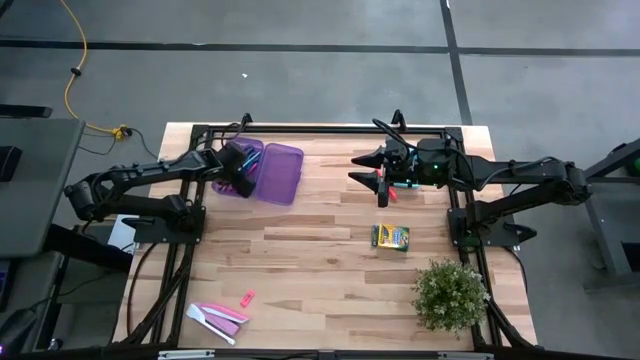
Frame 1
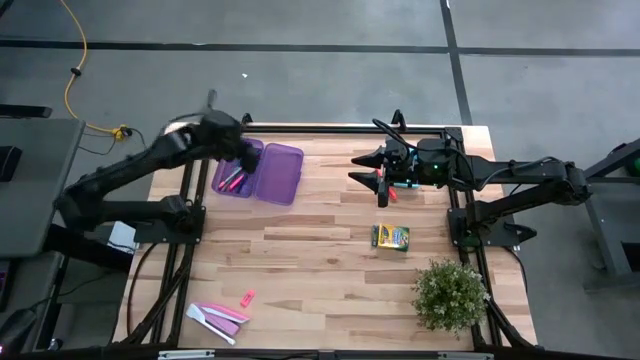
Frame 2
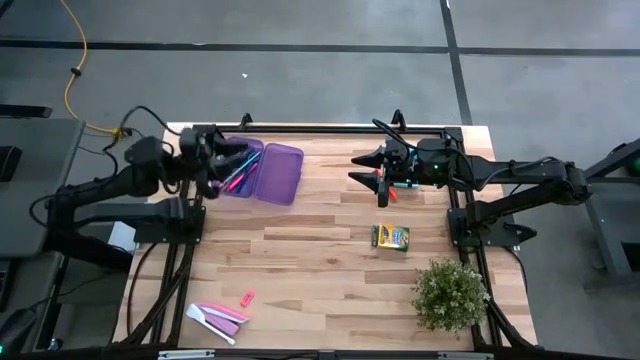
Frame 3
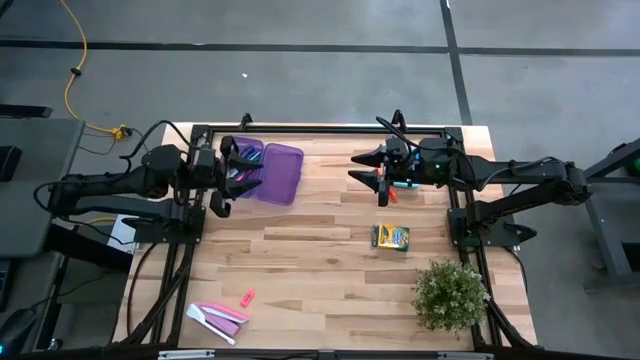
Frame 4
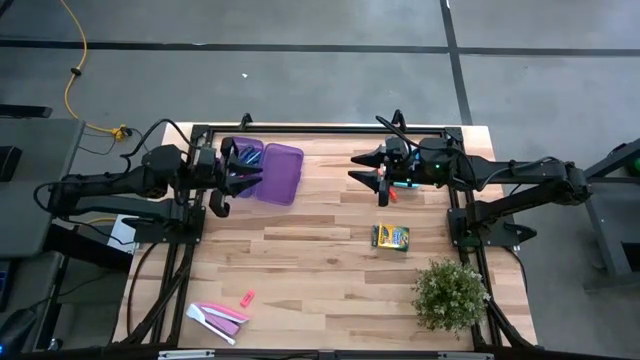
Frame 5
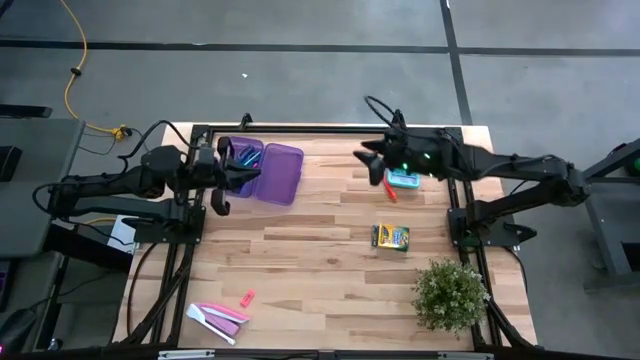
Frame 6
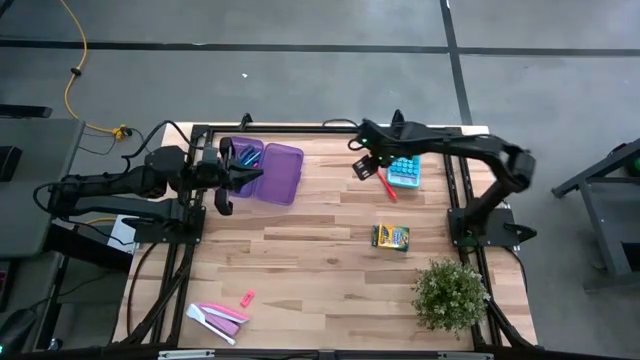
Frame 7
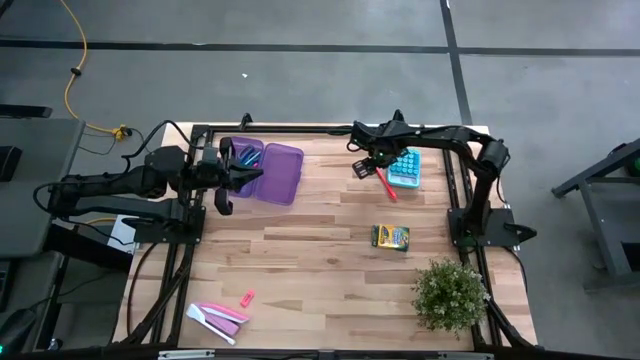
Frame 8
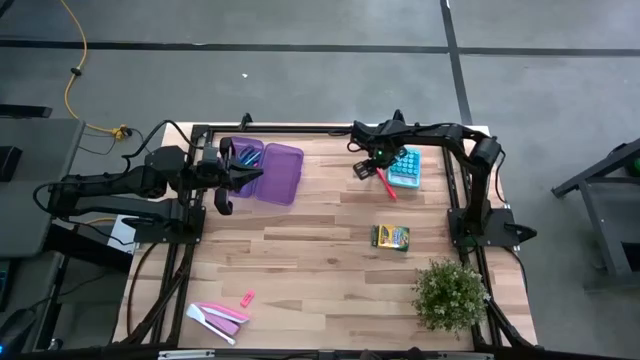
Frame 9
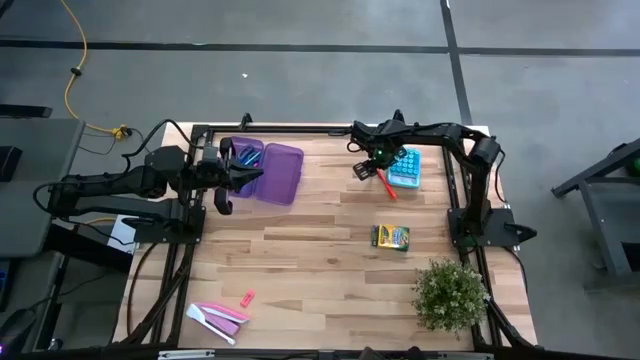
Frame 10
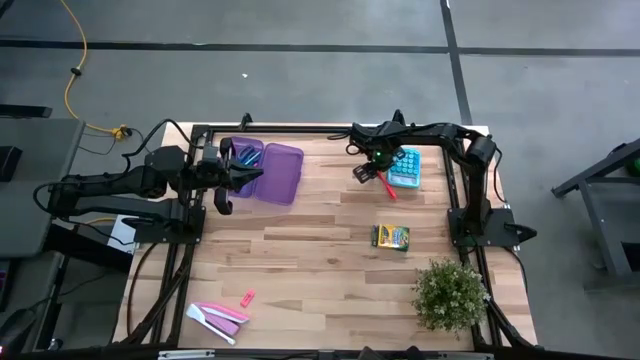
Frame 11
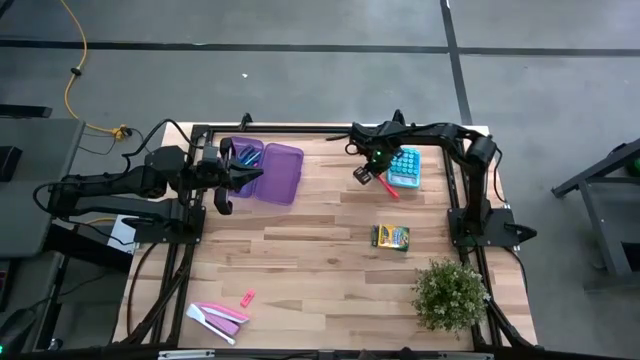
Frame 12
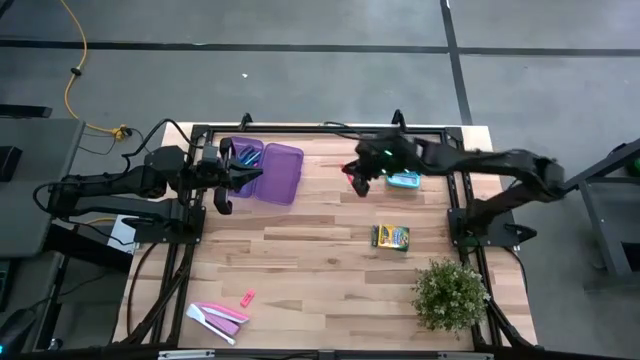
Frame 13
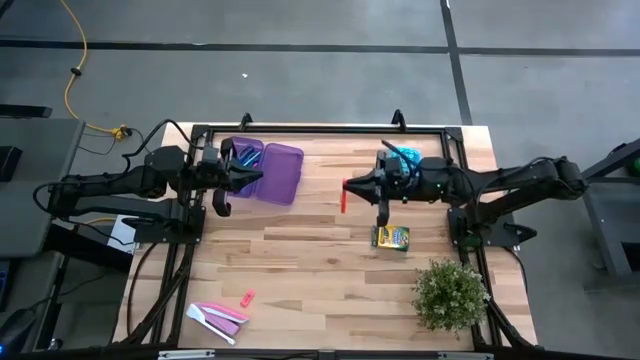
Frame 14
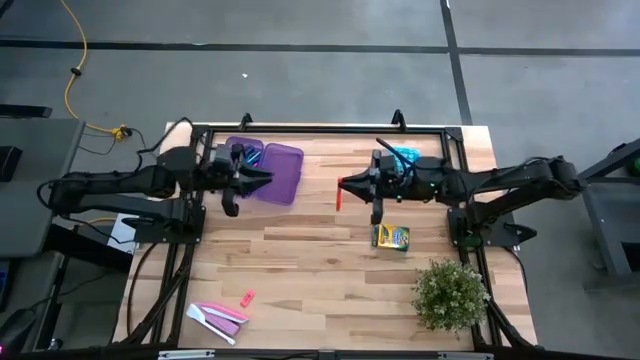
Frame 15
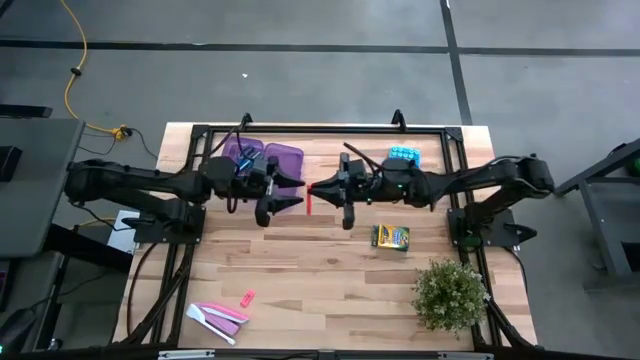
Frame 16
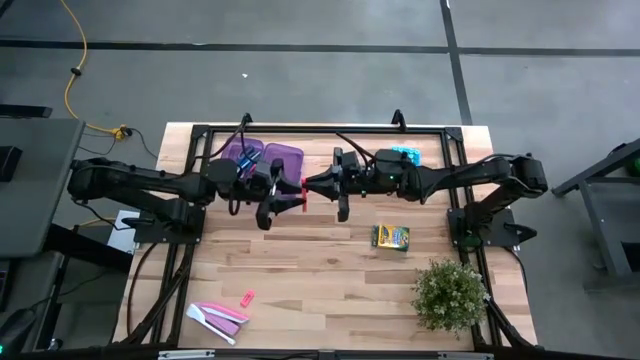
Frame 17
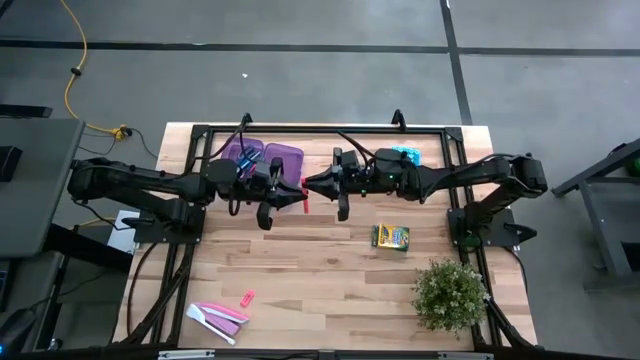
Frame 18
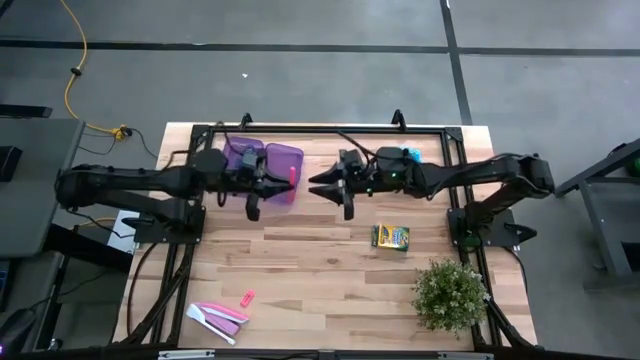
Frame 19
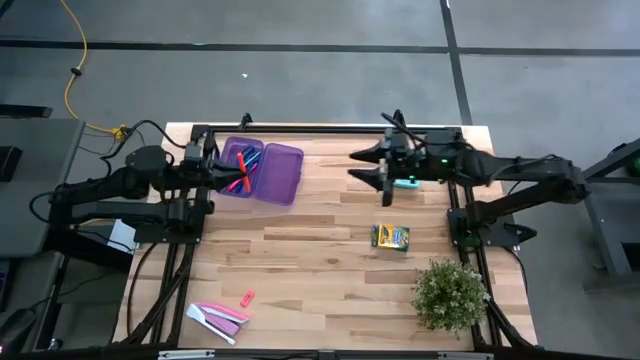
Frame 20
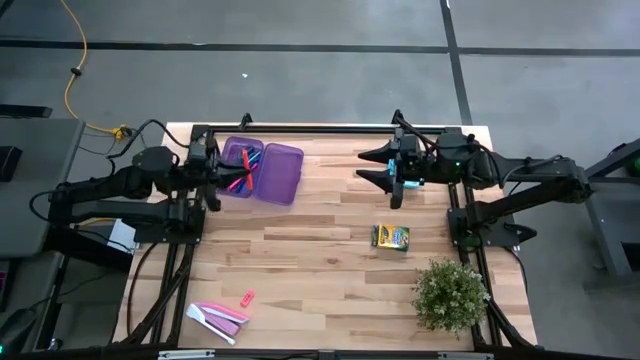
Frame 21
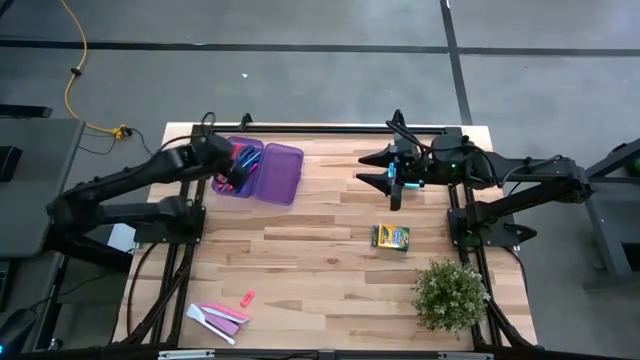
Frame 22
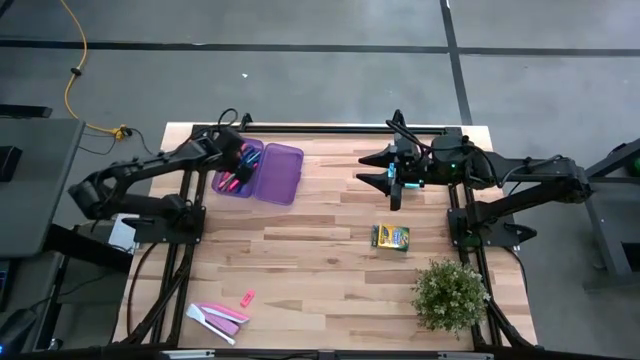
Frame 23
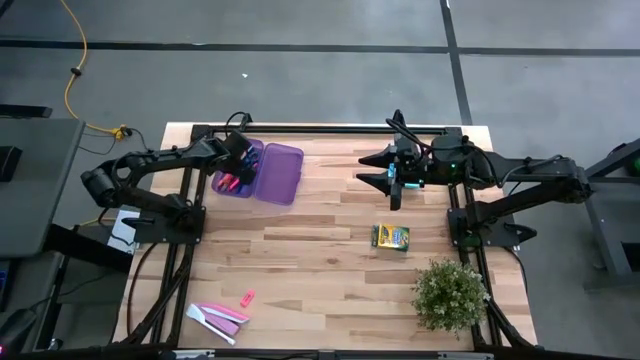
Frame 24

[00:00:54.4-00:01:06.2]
Task: Pack school essentials
Put the orange pen into the purple supply box

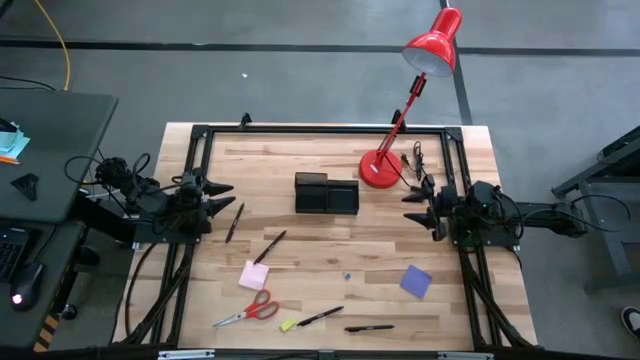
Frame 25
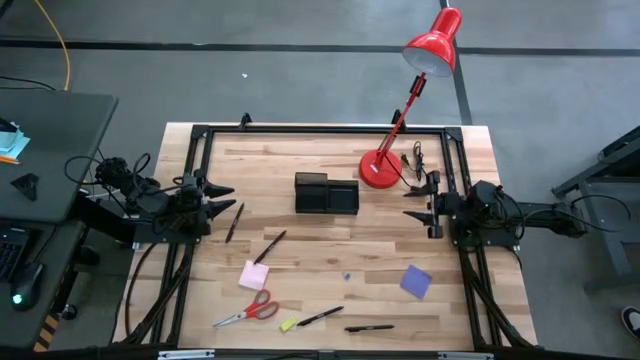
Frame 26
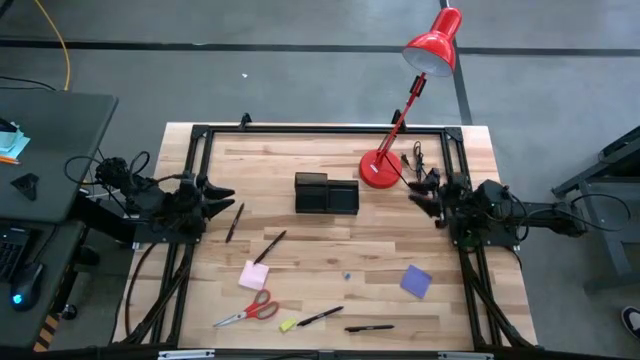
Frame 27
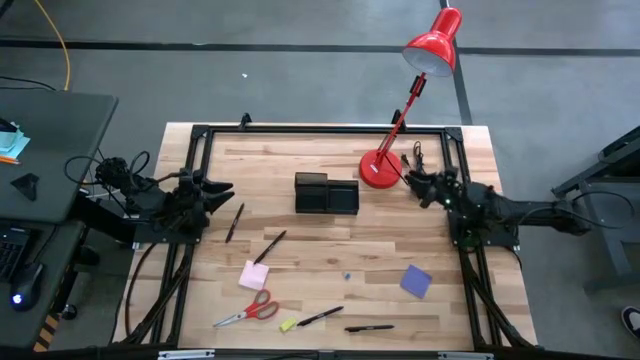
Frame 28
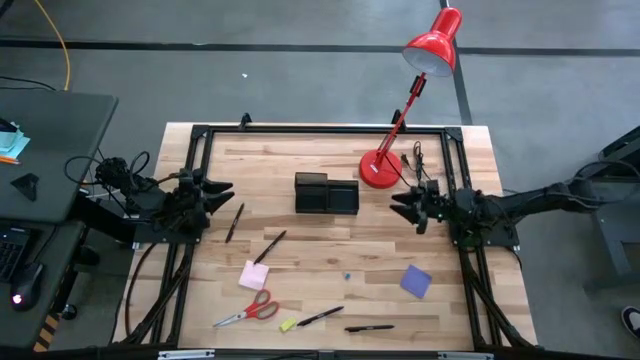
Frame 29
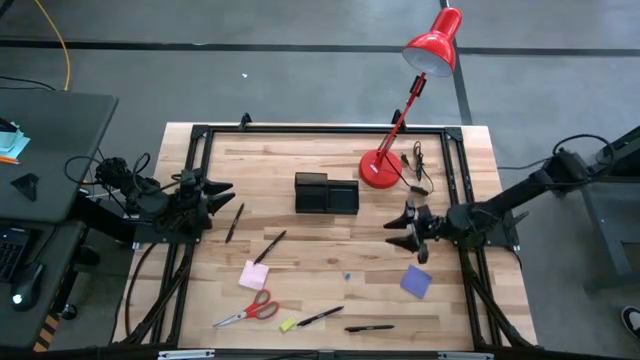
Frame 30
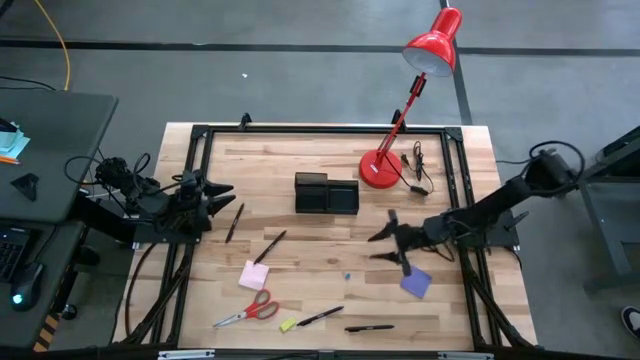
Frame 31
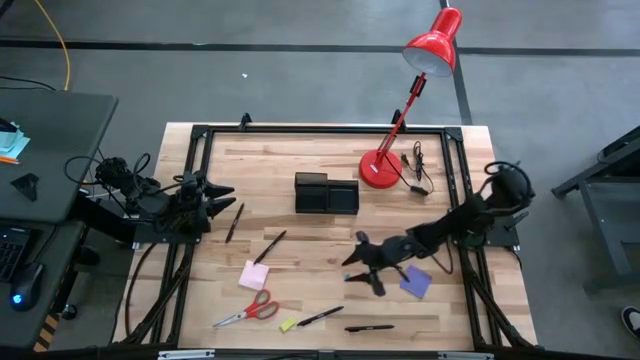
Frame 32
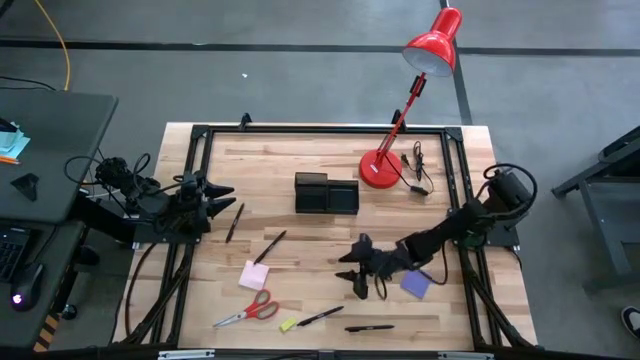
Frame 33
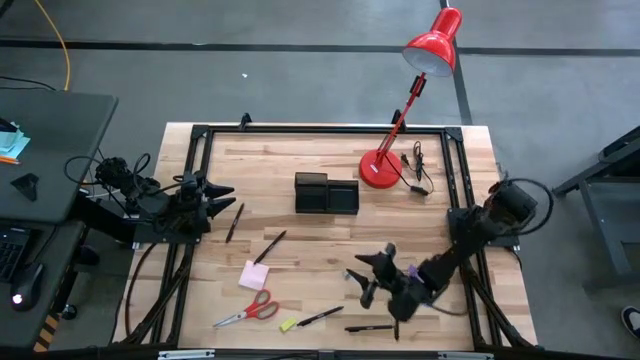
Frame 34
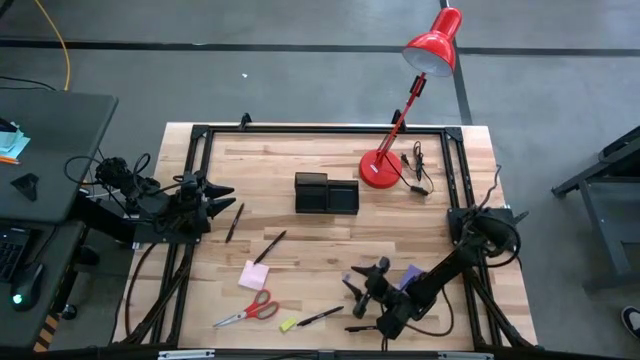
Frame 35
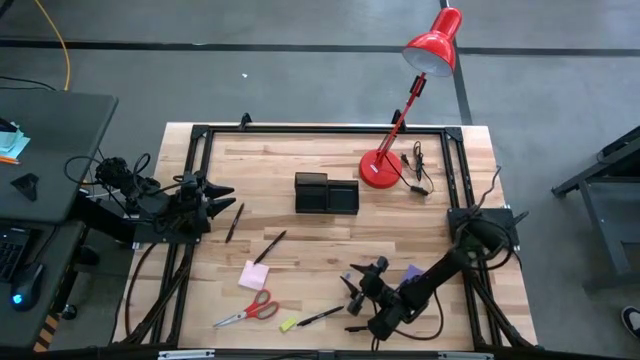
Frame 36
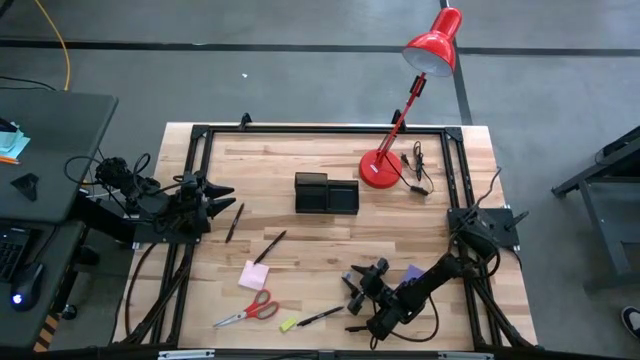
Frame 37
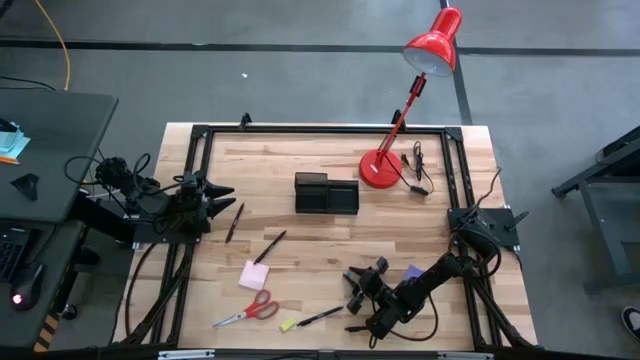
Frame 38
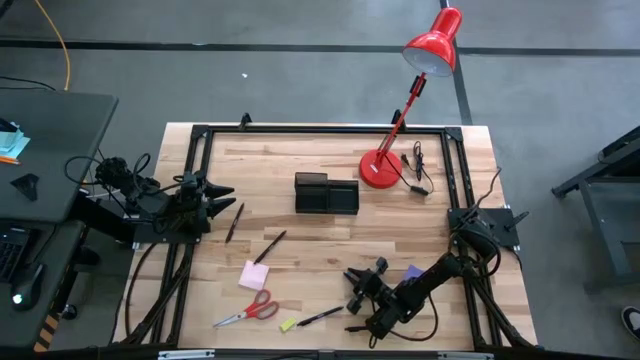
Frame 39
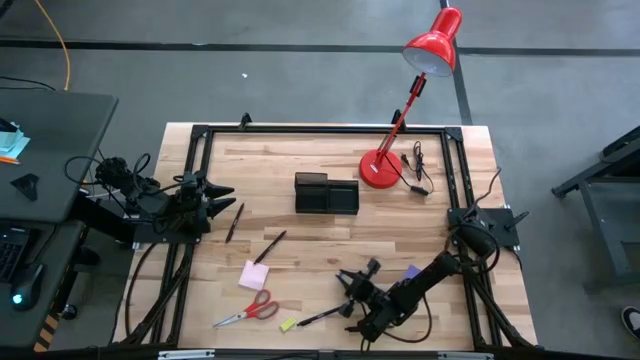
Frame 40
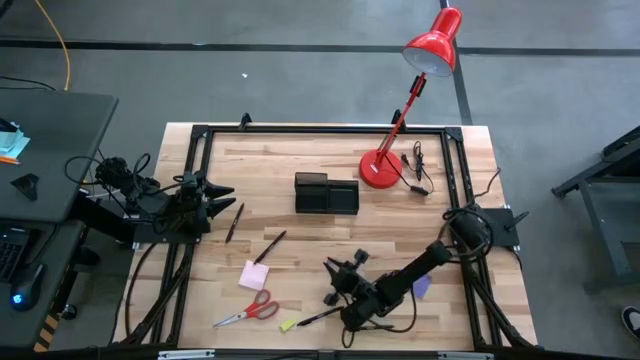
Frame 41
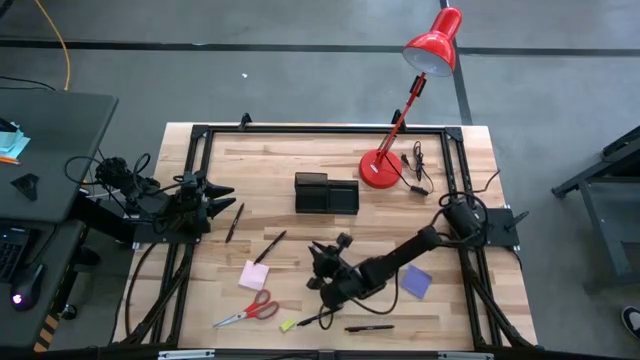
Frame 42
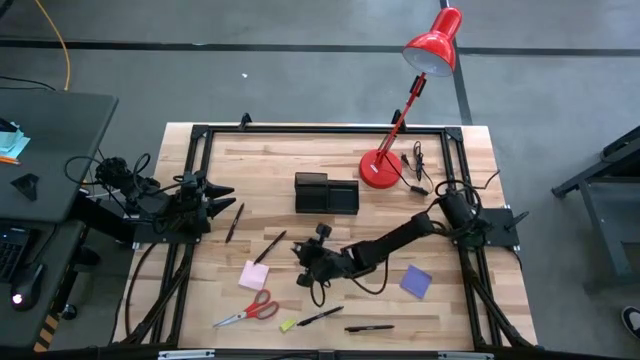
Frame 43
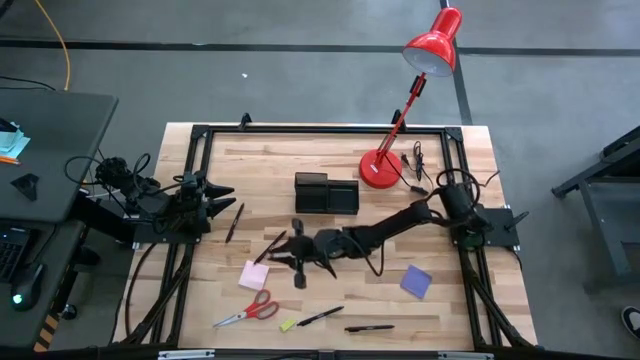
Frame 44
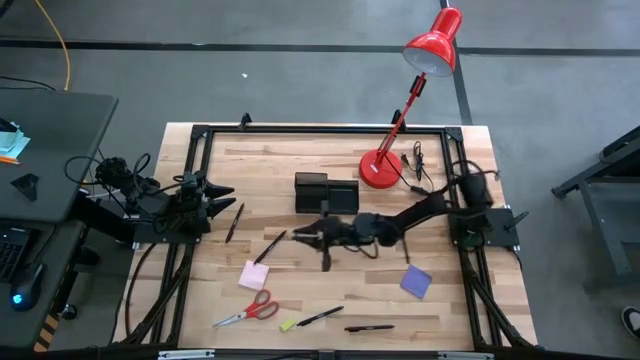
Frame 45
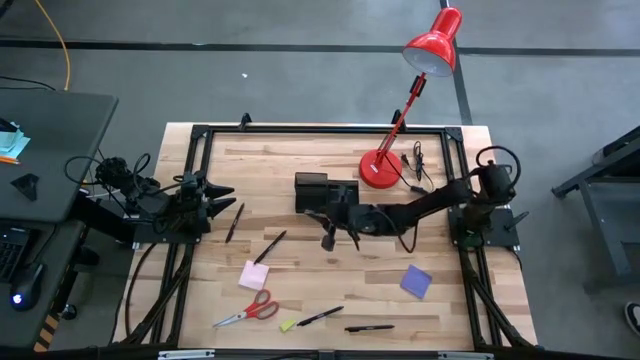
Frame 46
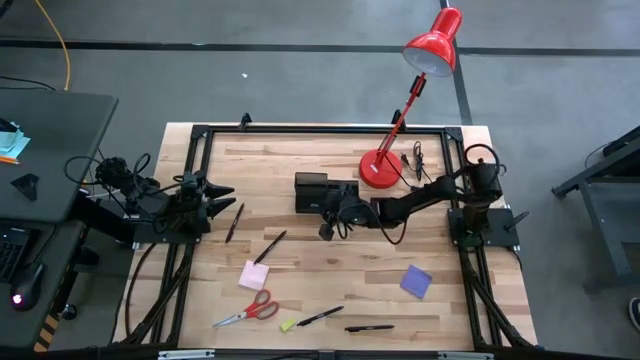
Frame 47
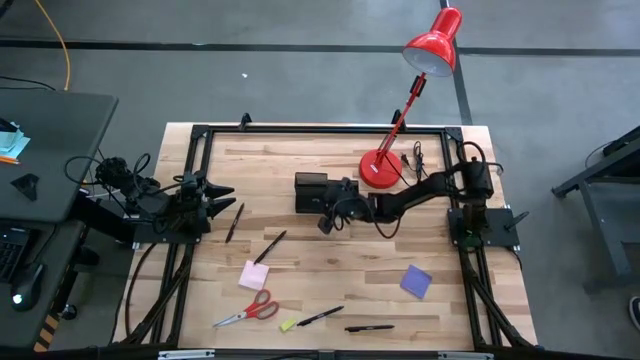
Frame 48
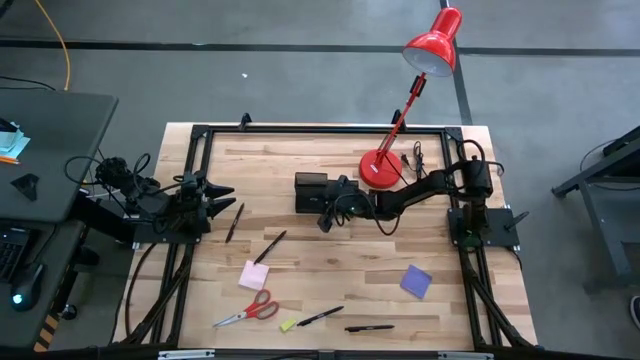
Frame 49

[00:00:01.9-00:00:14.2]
Task: Pick and place office supplies into organizer
Put the blue binder clip into the black desk organizer
